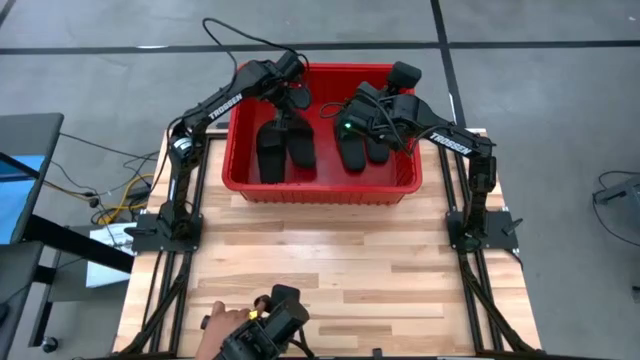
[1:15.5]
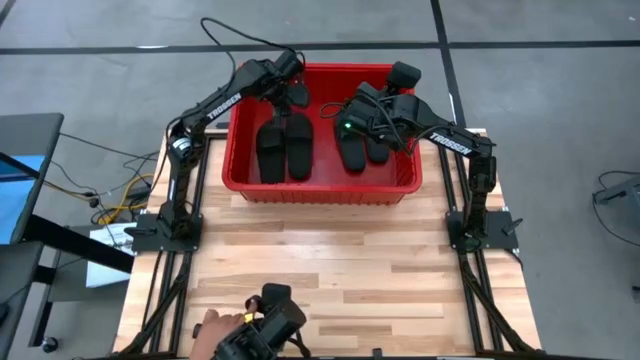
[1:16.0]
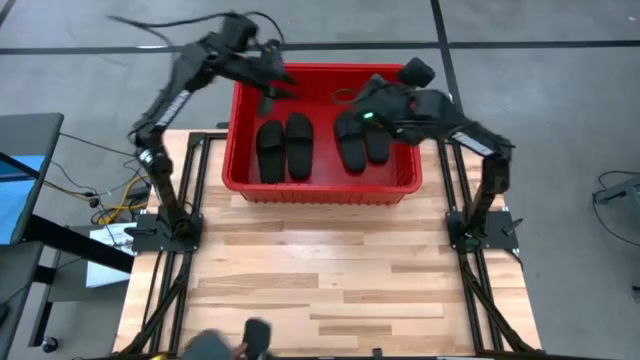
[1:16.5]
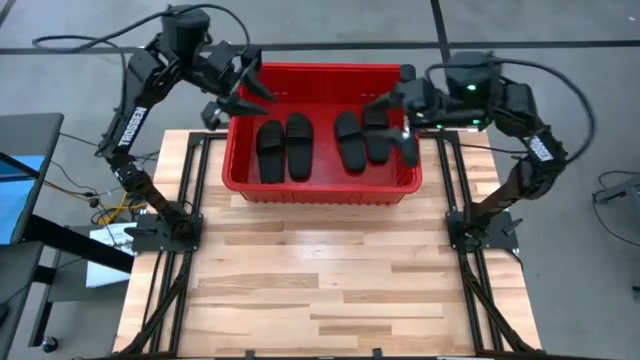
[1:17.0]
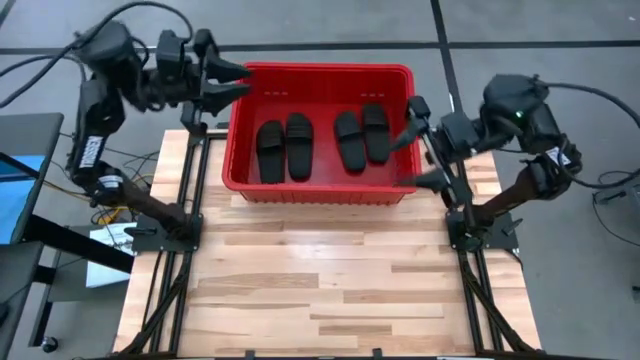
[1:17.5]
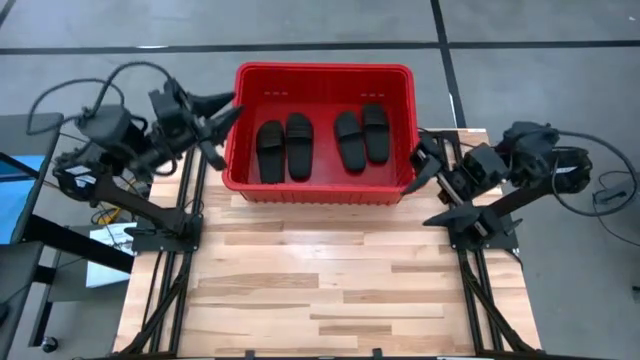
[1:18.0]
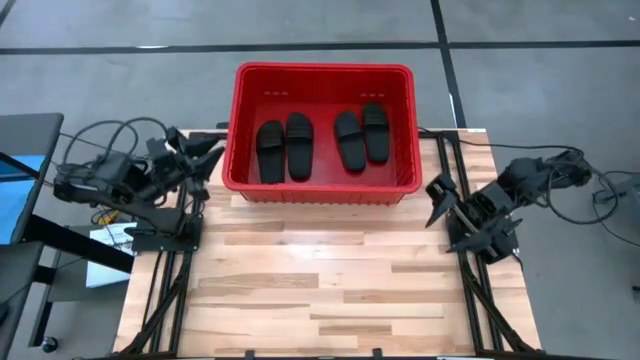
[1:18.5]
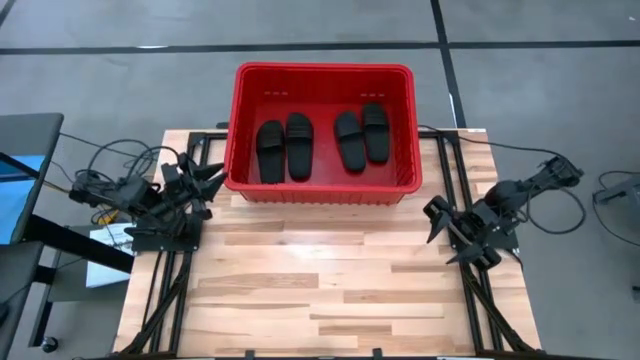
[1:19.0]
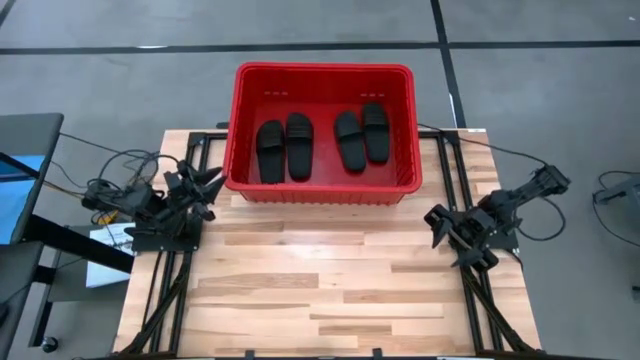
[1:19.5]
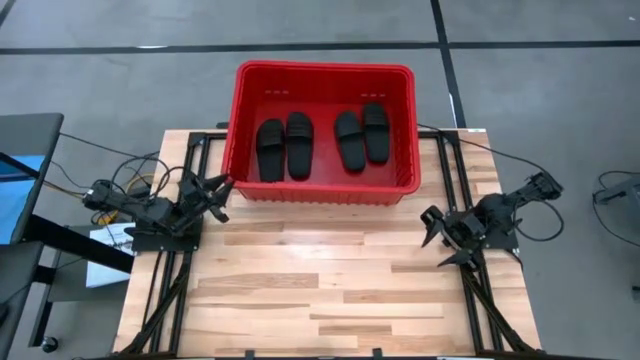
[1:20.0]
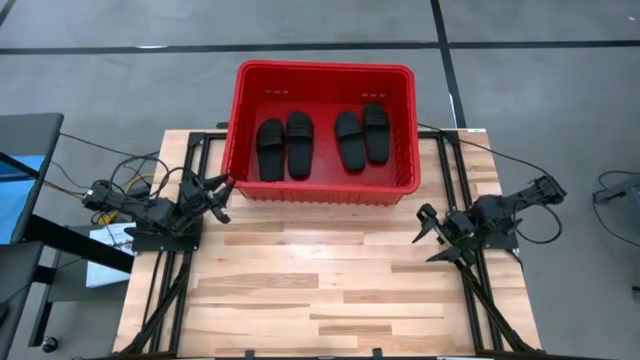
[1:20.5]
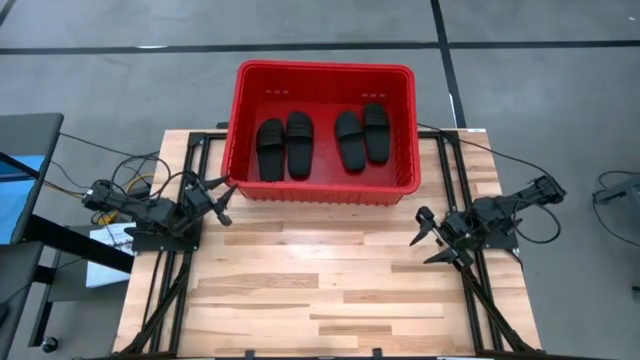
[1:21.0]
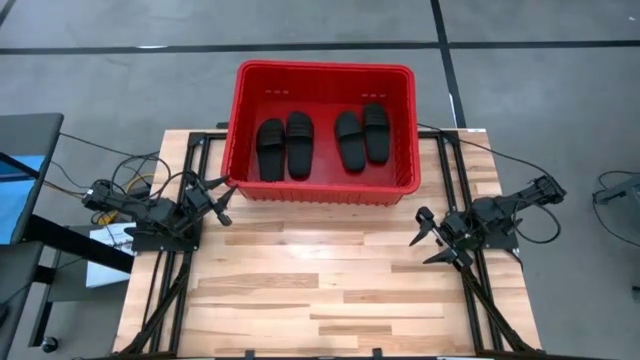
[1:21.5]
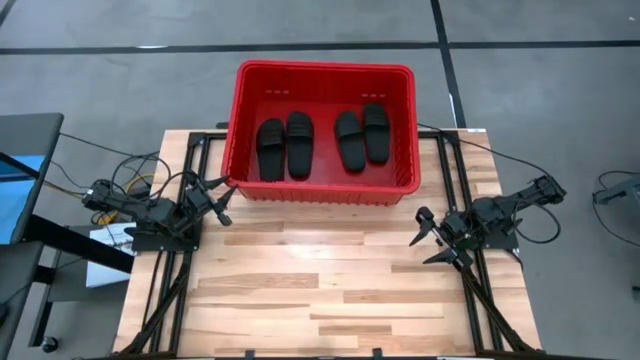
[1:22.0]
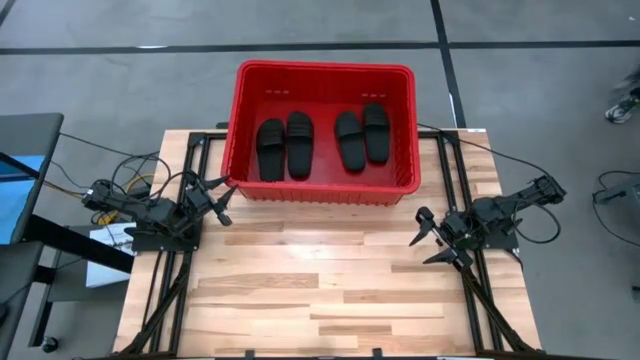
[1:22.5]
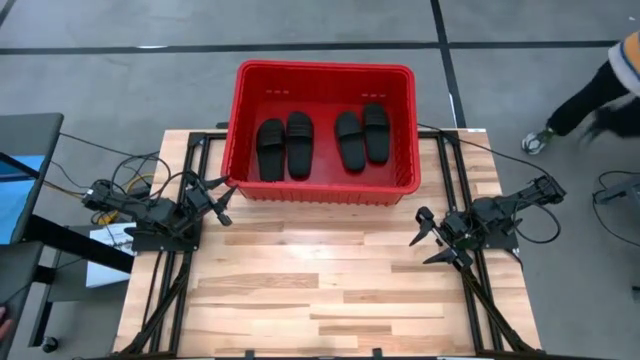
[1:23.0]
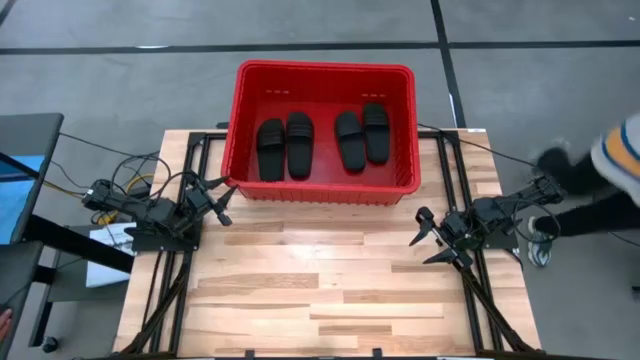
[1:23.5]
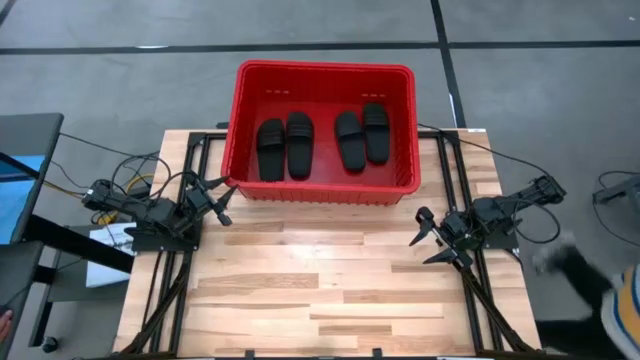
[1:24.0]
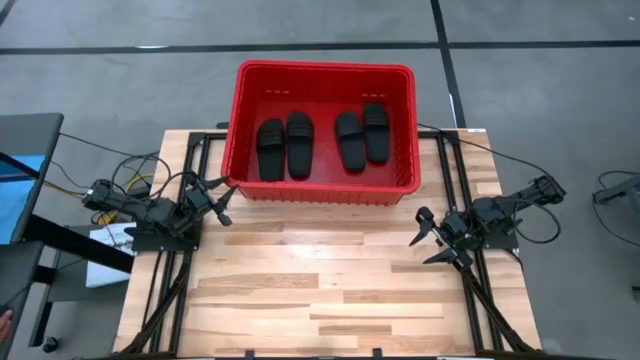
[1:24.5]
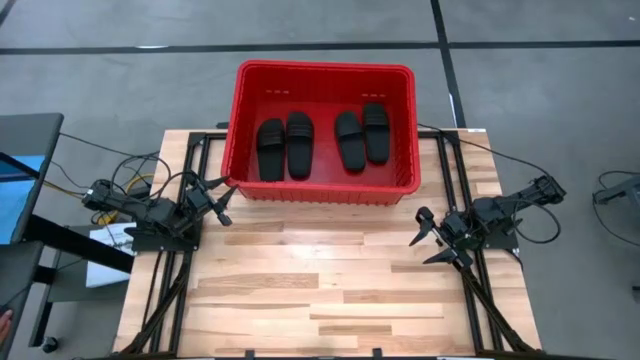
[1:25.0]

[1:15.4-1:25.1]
Task: Pick and place slides into bin
Return to Home Position

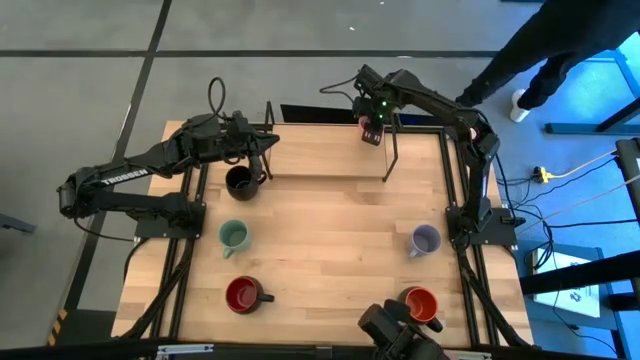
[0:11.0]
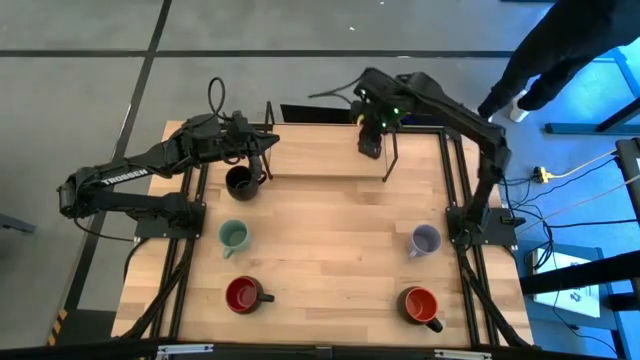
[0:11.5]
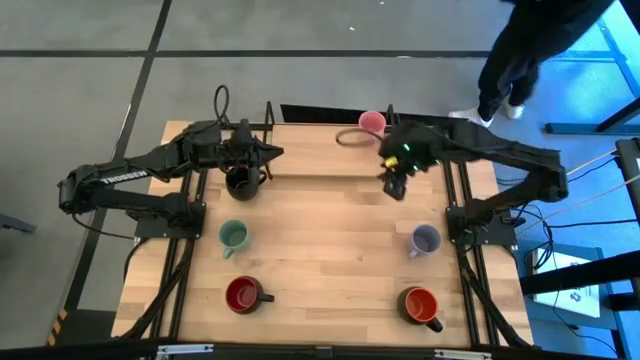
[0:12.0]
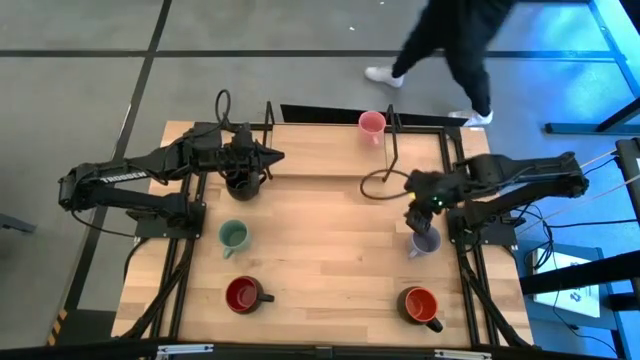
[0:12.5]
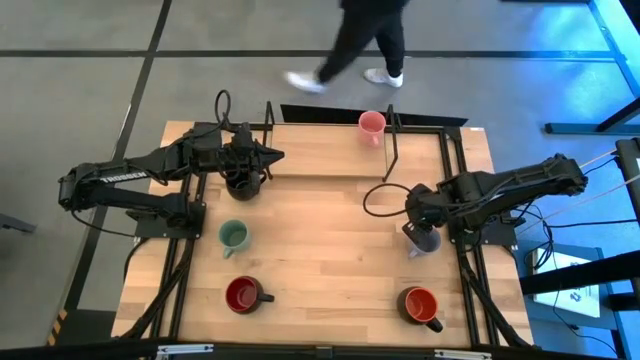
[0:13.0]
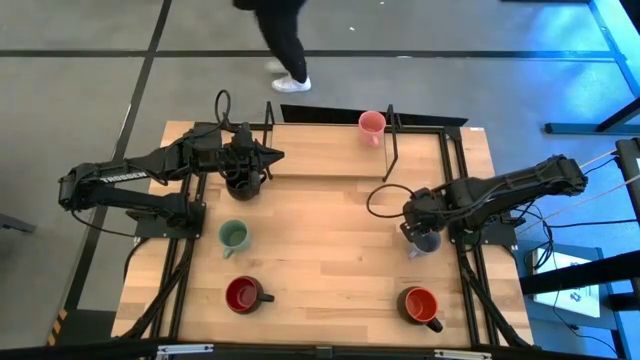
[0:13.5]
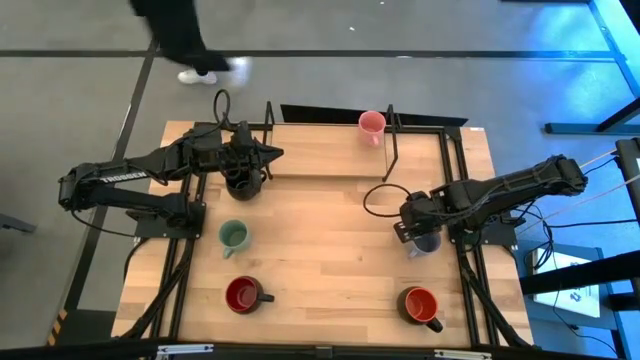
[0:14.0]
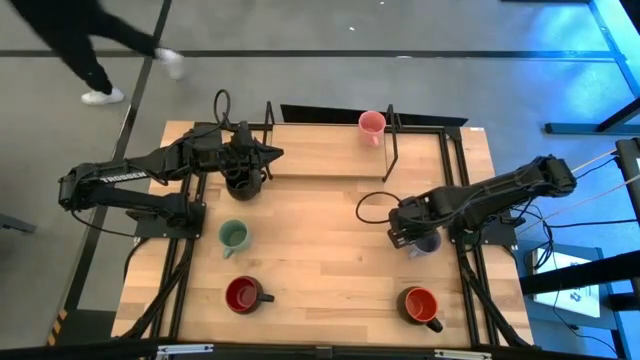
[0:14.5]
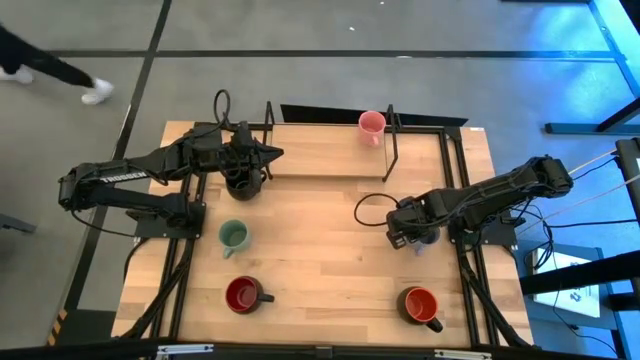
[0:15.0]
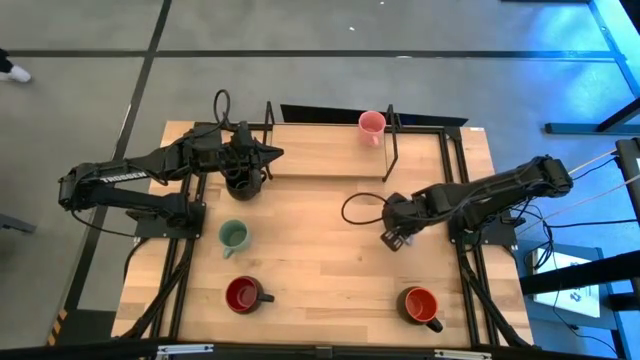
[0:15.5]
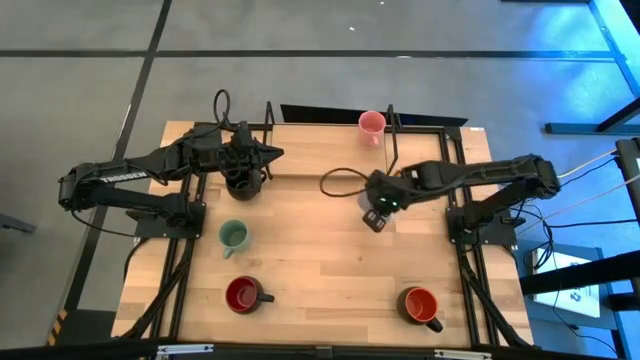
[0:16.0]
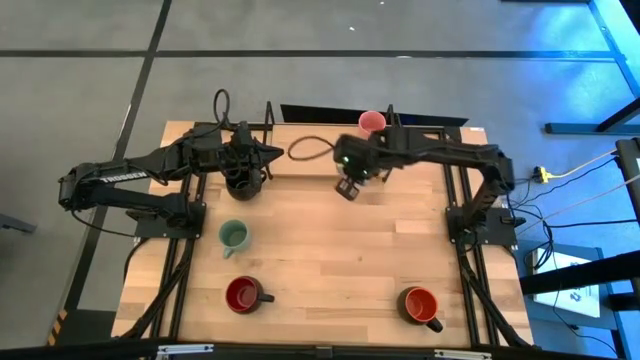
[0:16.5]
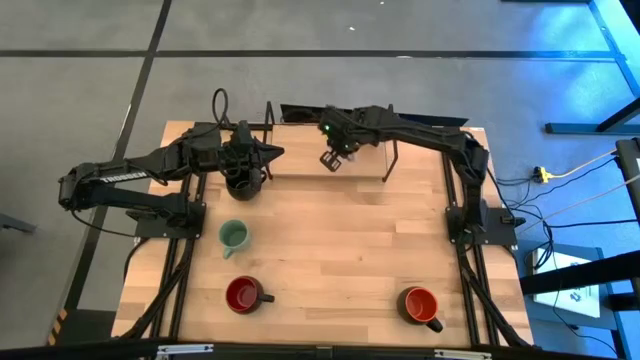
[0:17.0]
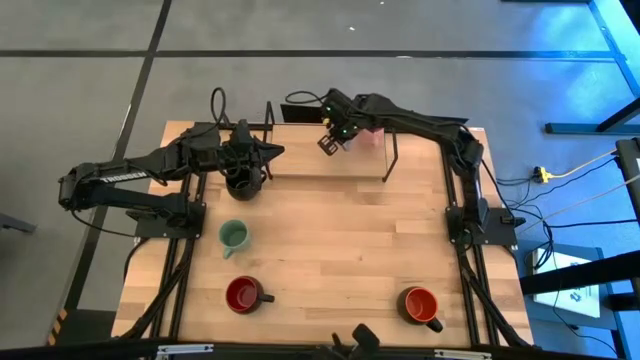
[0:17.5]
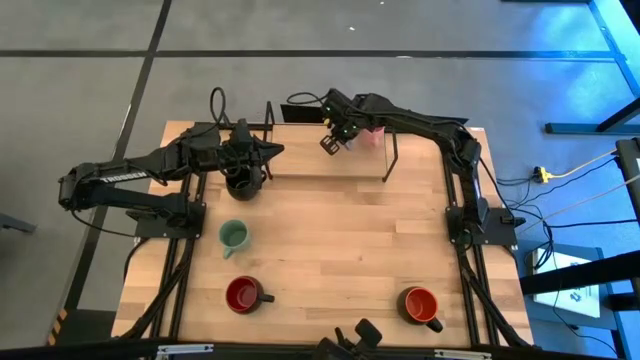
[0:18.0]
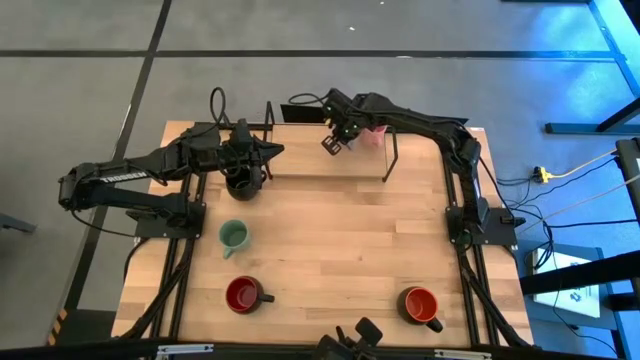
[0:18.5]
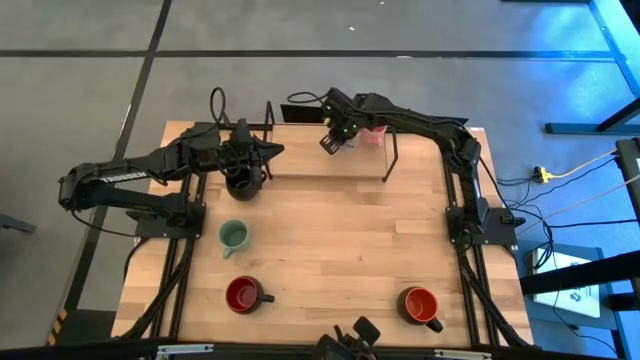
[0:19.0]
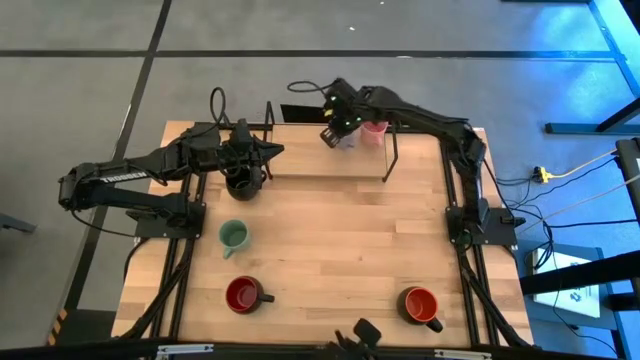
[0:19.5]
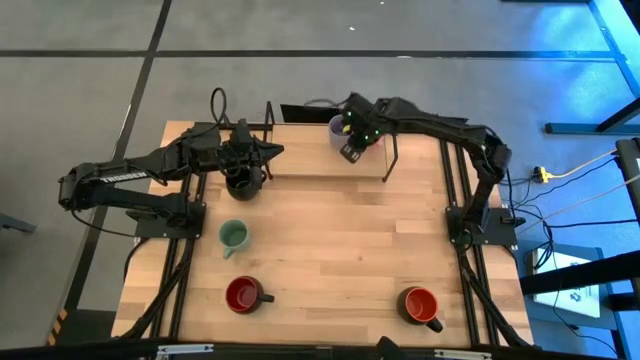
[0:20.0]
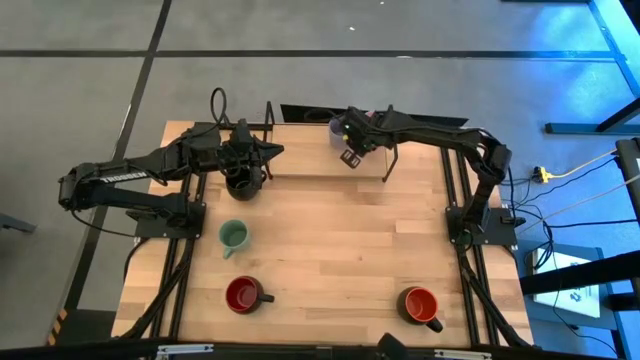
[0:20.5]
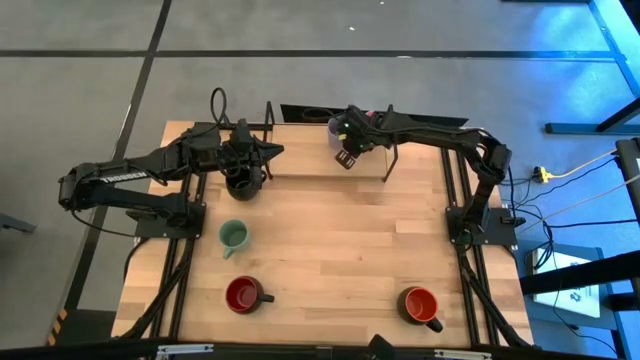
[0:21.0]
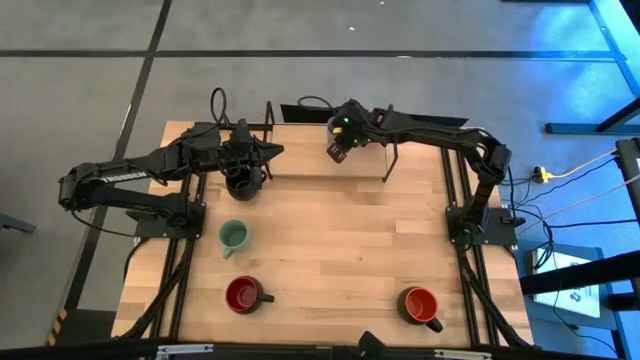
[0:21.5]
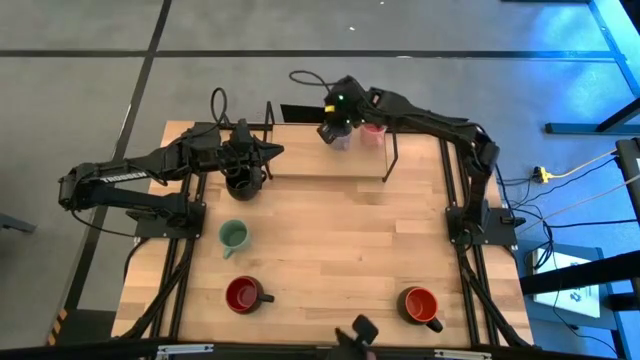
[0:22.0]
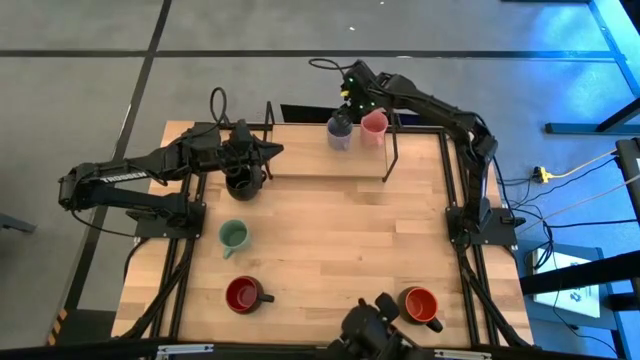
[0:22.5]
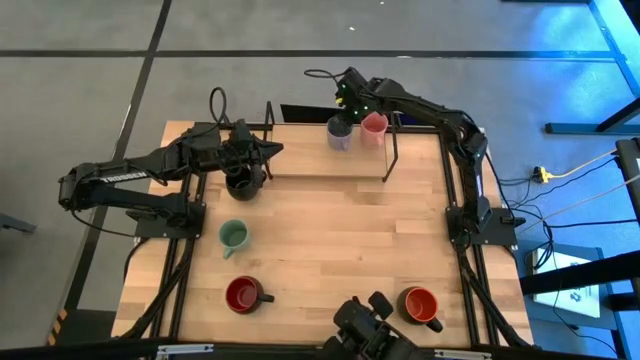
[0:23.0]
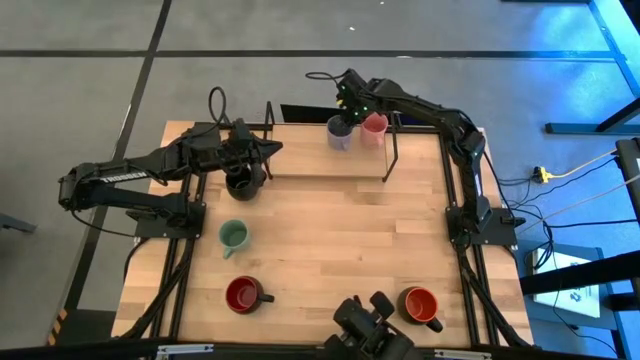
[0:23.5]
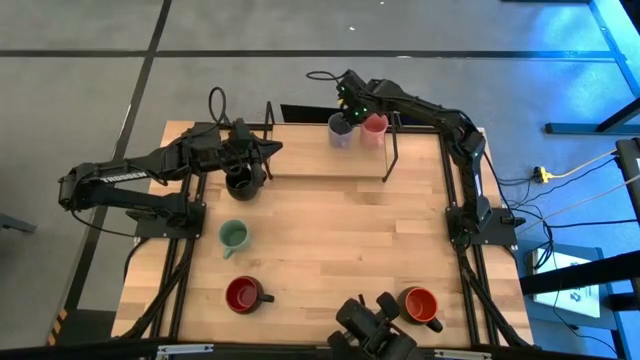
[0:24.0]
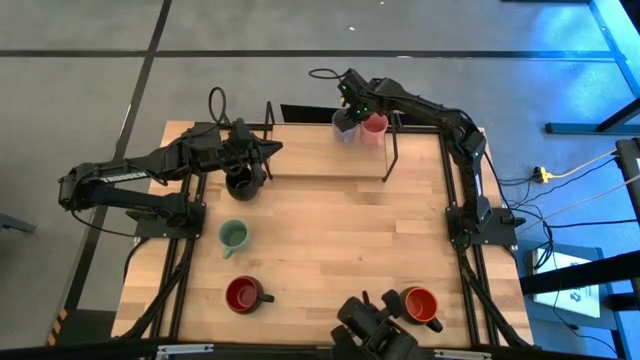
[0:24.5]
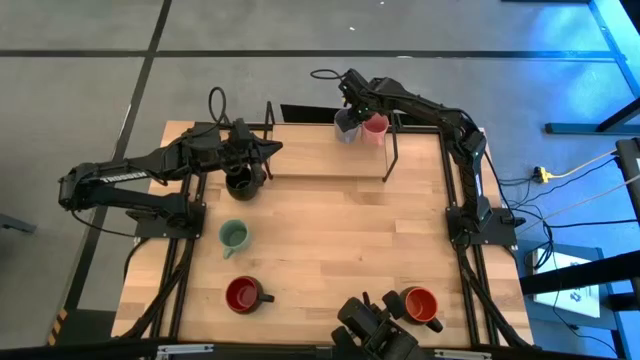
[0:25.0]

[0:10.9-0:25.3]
Task: Place coffee mugs
Put the purple mug on the shelf
